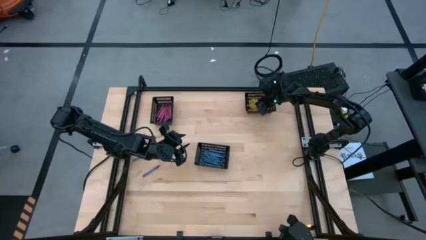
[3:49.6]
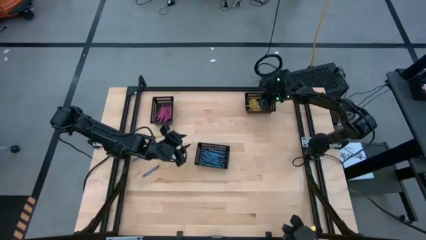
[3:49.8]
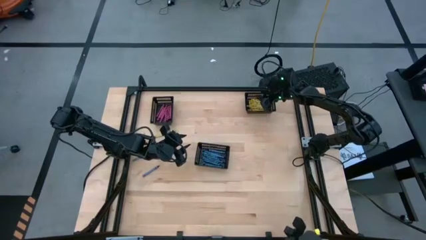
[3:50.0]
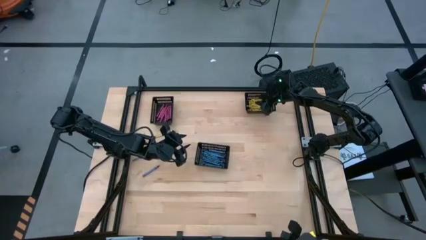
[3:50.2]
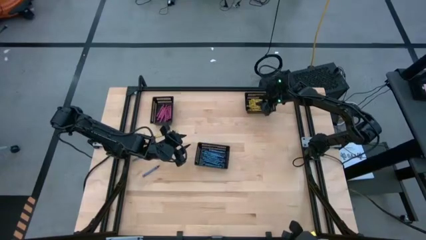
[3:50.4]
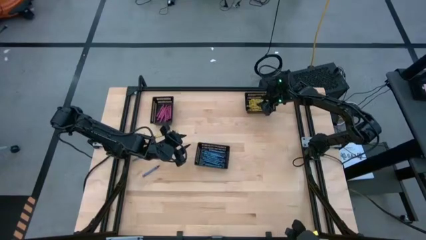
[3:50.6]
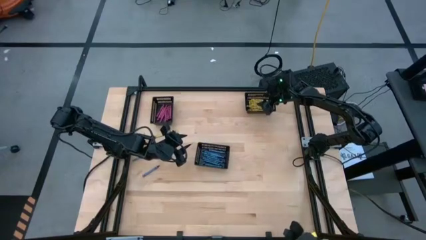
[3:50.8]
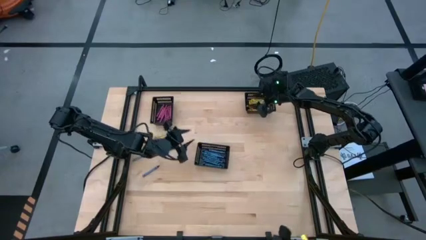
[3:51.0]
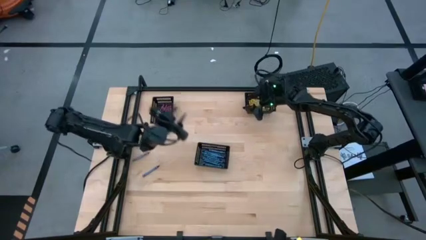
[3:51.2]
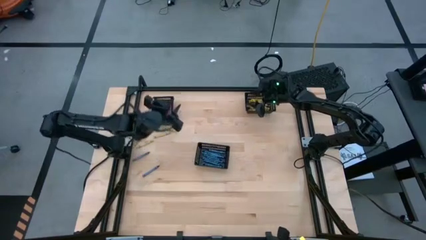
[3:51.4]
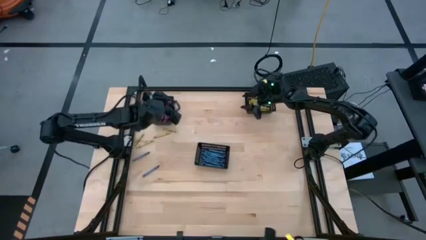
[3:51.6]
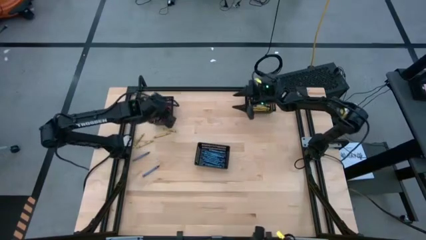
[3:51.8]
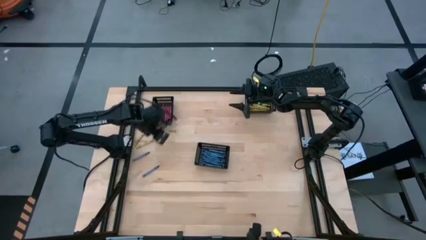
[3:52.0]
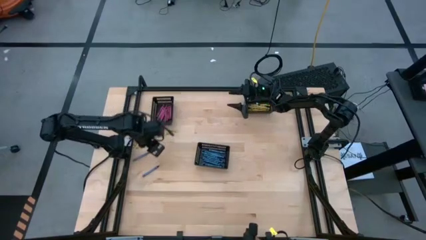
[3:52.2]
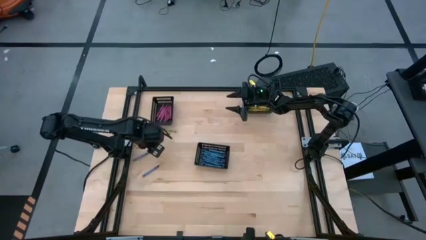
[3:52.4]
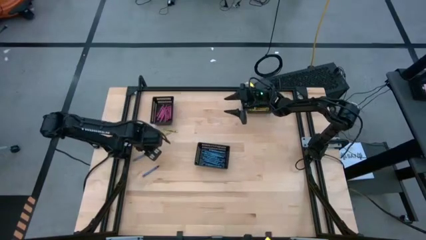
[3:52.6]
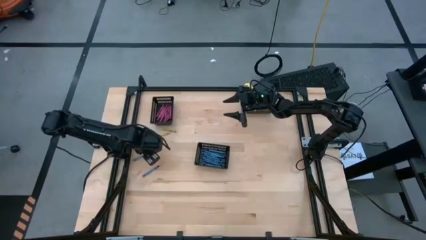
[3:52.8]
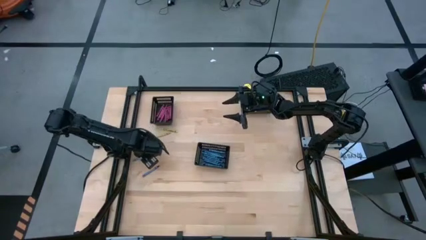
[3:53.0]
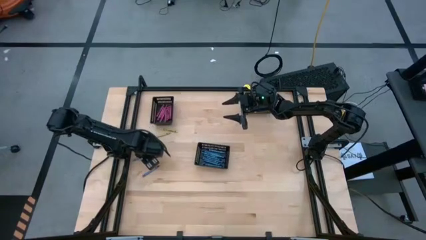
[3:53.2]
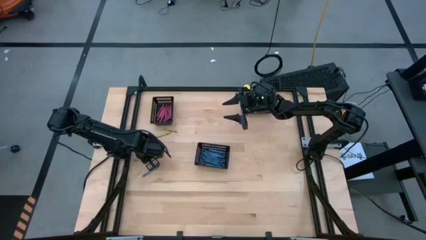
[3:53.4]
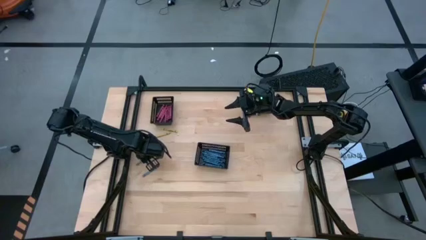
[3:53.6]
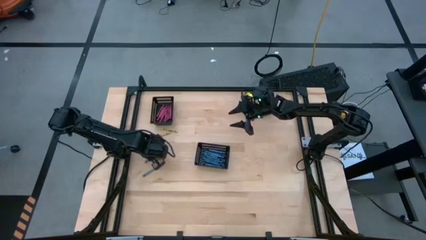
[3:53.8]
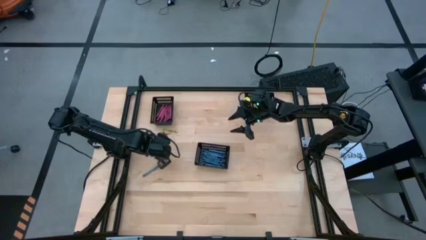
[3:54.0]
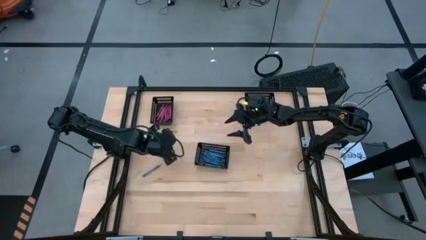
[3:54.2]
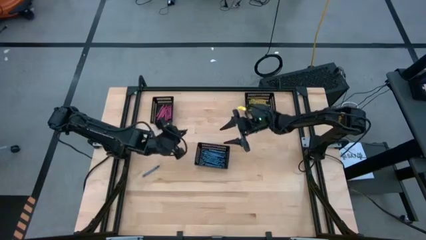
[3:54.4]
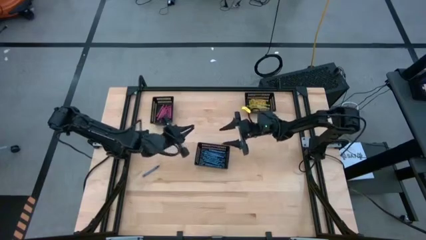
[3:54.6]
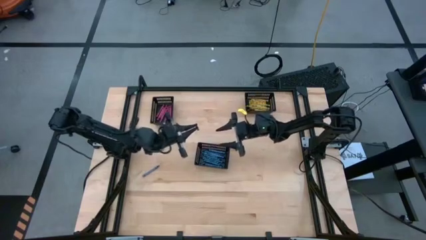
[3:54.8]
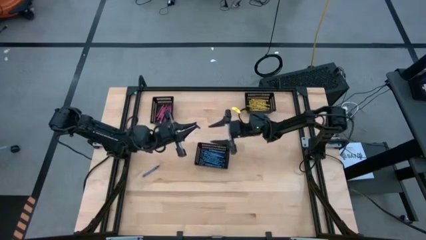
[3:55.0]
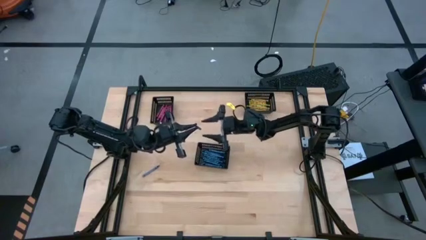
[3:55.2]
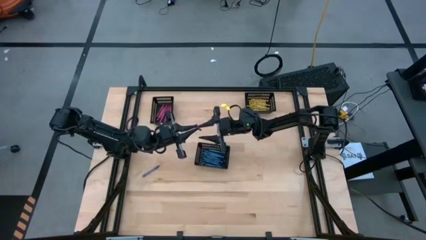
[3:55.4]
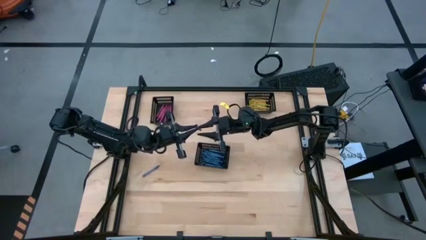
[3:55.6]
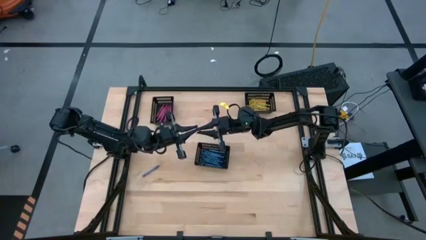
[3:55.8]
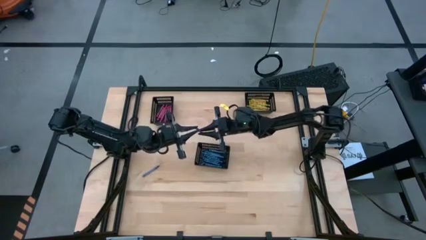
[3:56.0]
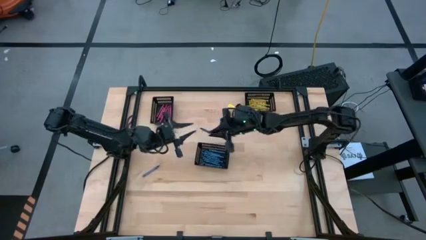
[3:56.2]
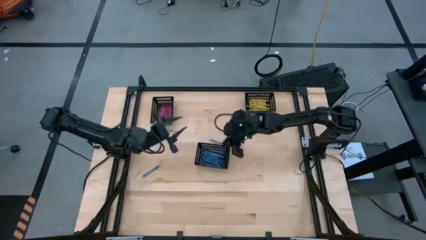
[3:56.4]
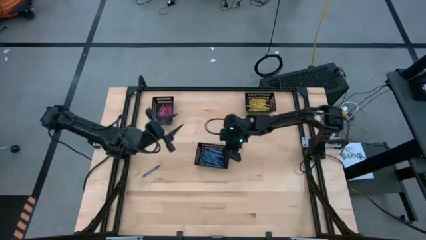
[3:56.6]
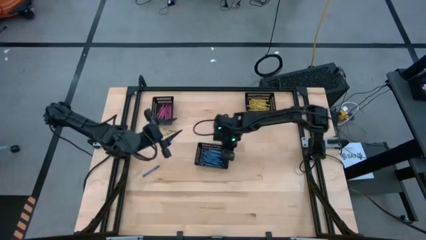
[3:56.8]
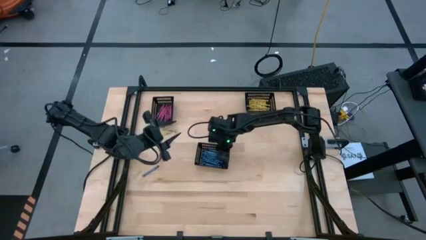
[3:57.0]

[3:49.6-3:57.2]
Task: Sort crayons
Put the blue crayon into the bottom black bin

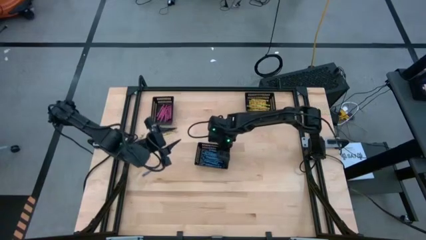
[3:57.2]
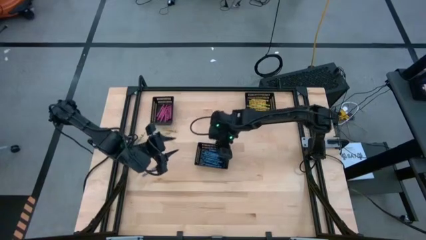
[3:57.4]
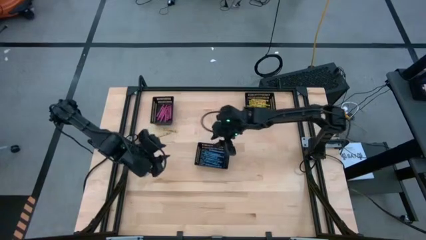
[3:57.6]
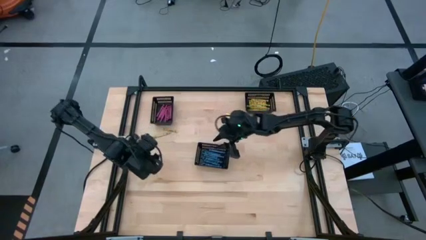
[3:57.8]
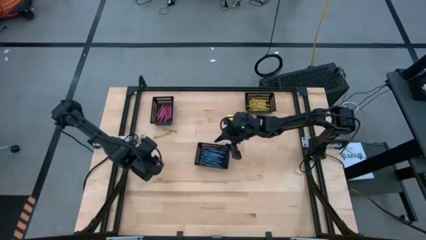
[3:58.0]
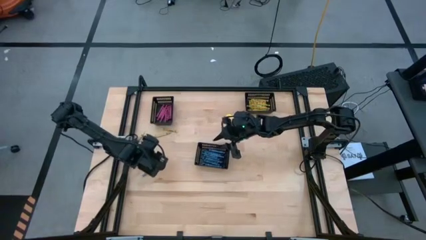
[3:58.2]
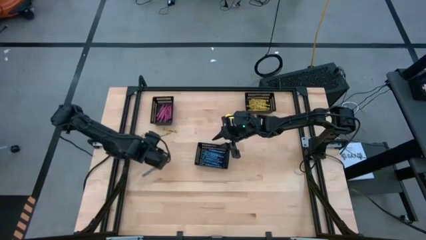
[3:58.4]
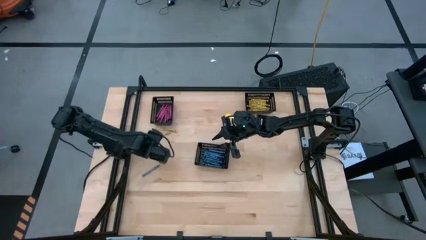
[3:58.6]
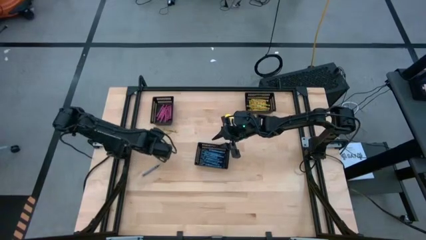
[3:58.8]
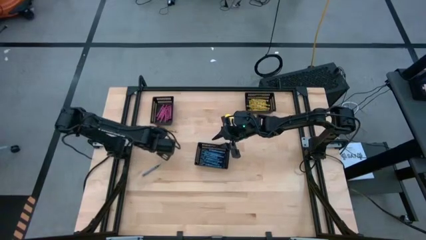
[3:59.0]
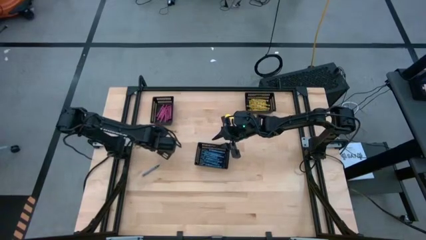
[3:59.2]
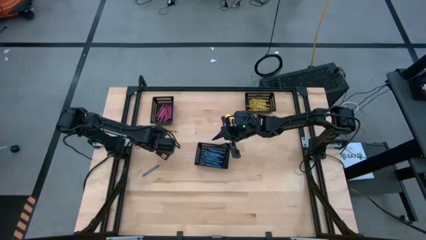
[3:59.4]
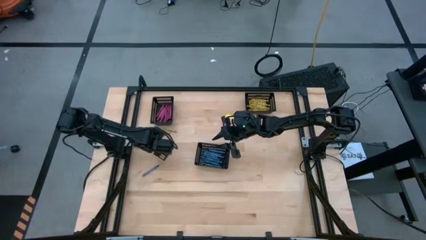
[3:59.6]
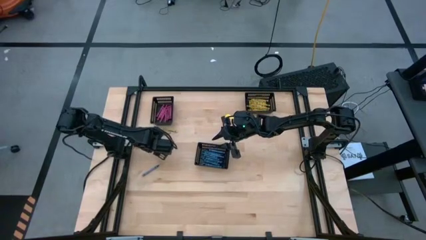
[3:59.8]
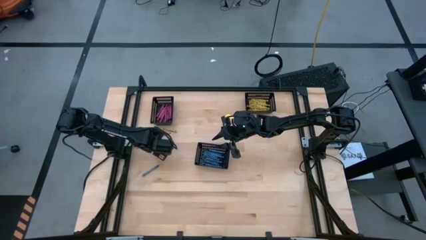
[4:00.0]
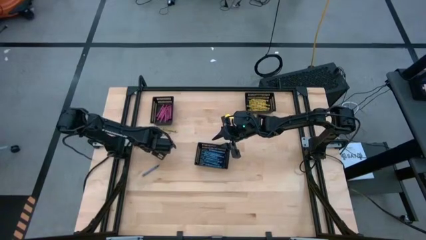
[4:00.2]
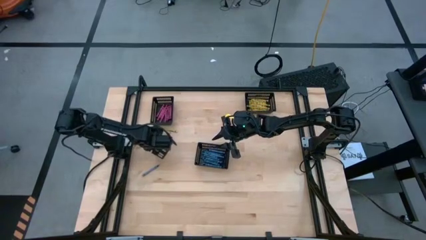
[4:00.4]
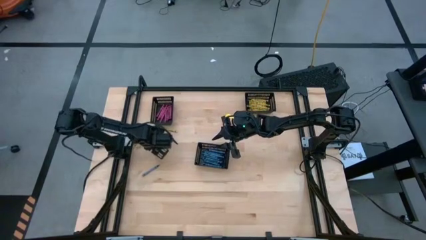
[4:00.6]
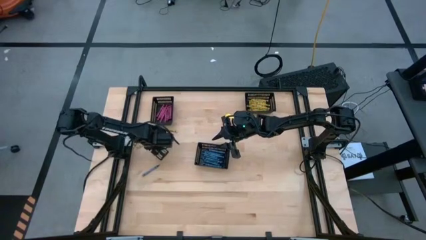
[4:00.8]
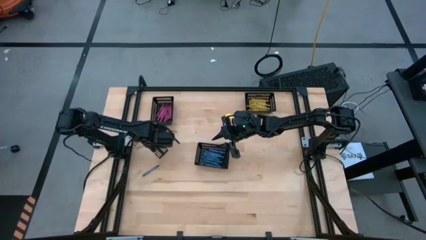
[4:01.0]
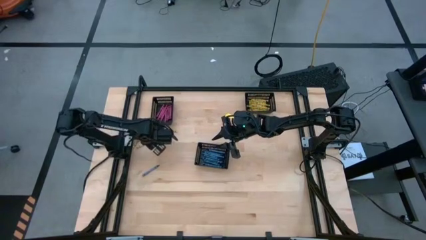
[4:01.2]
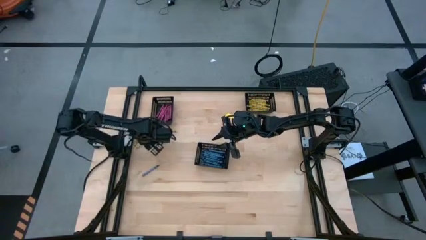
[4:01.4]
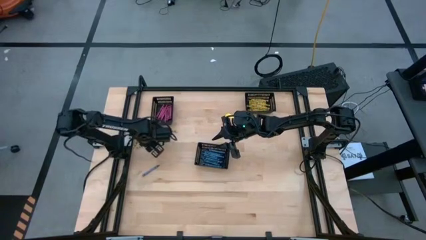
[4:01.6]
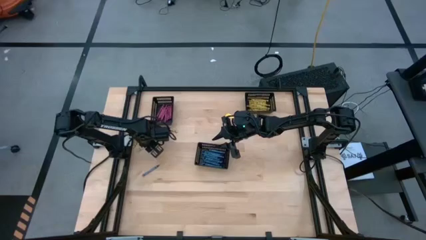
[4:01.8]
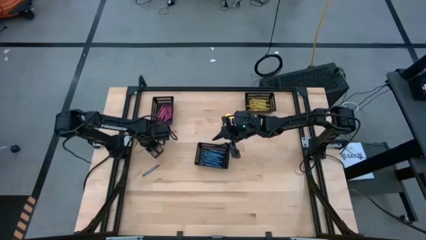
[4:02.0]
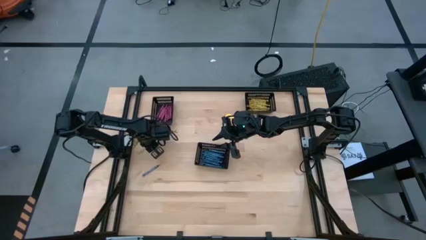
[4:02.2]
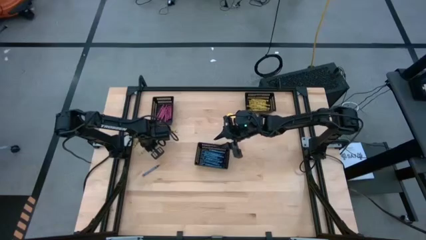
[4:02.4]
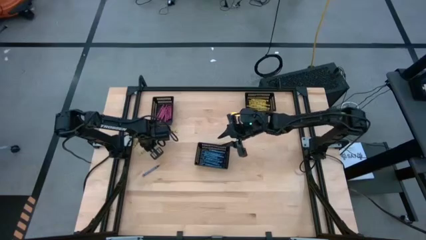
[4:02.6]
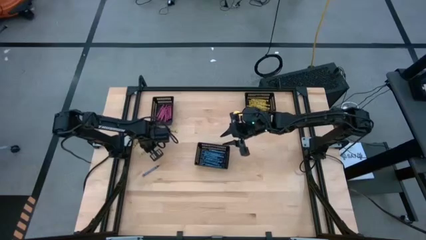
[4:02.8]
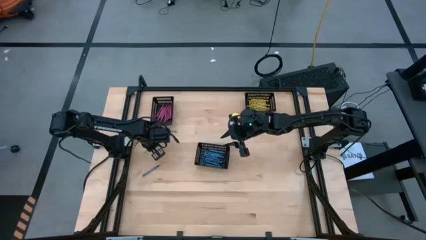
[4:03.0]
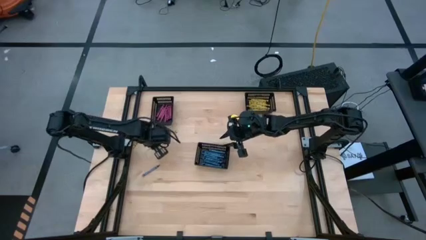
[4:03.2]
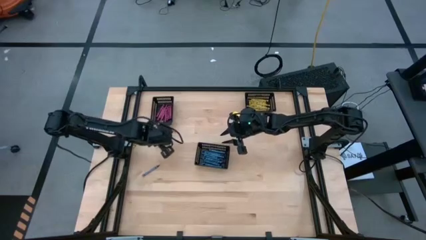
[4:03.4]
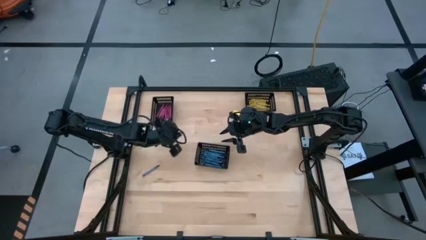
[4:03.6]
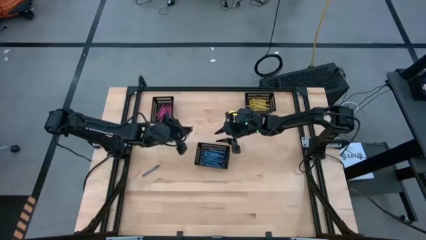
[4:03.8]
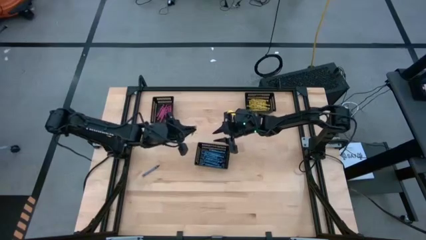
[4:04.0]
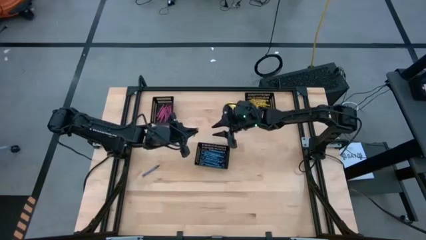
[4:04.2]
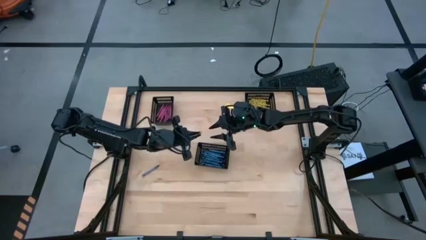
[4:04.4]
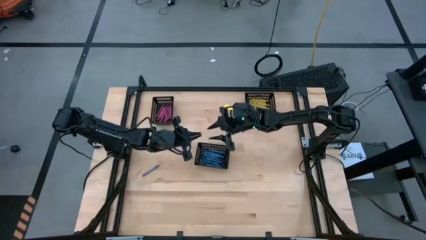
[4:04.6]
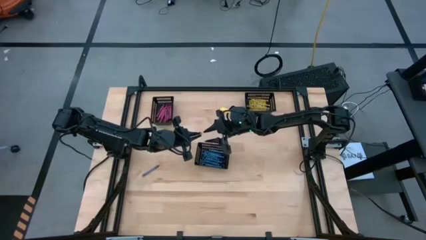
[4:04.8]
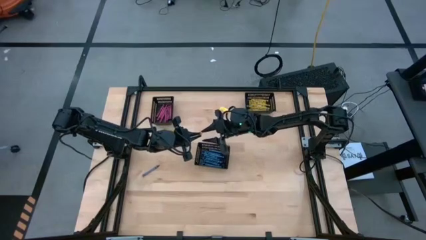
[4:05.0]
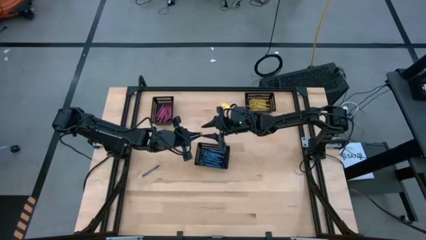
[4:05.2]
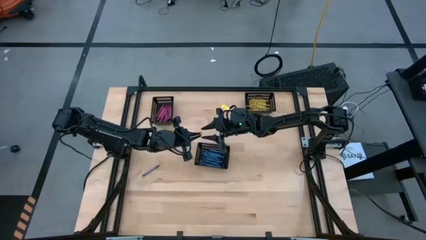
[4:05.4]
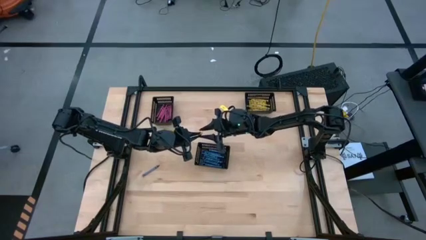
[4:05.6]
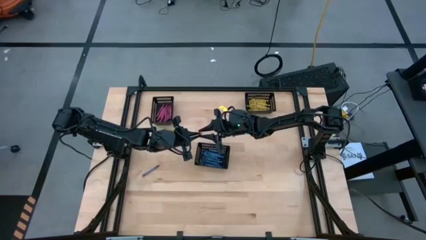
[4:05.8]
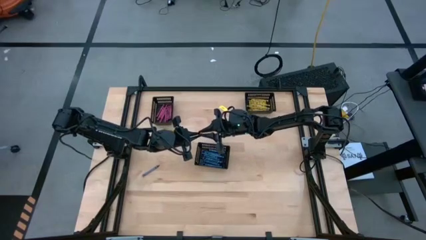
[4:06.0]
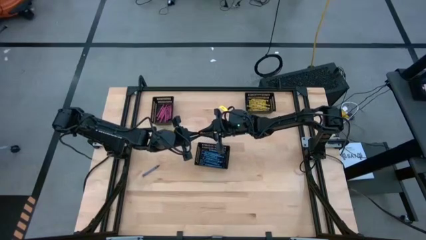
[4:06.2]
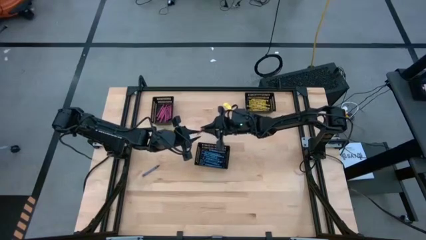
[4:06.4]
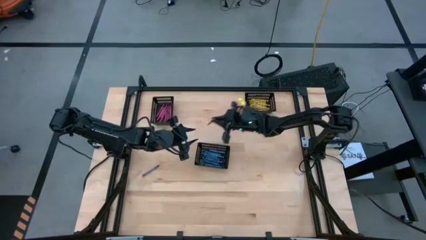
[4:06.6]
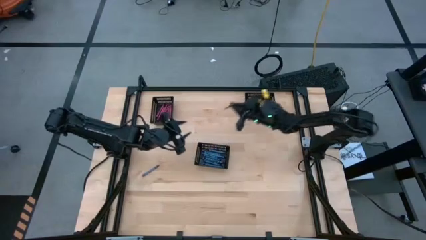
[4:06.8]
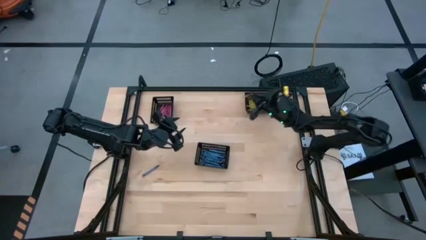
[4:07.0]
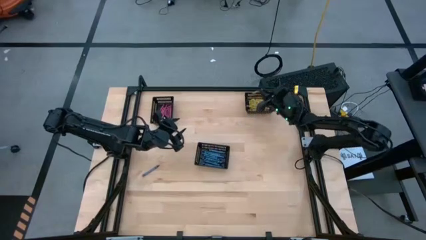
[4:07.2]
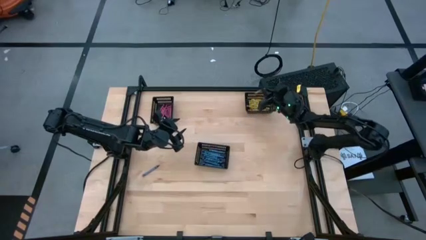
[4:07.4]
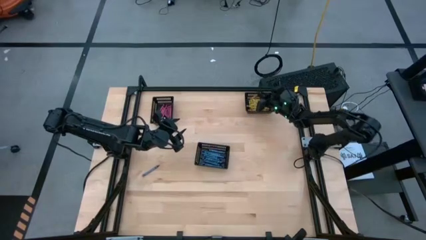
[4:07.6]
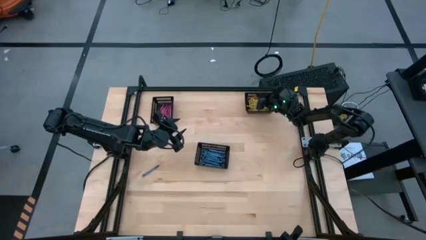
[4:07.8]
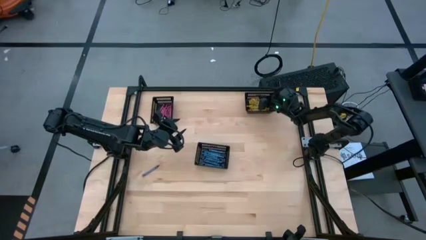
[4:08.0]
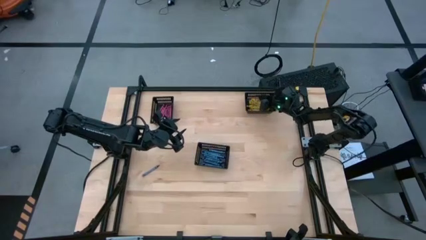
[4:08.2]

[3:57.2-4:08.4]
Put the yellow crayon into the top right black bin
